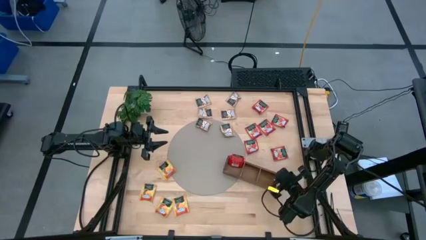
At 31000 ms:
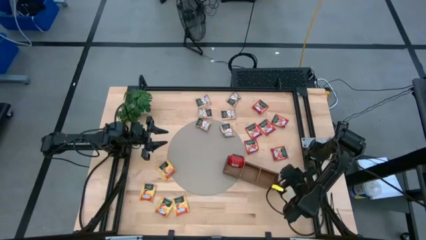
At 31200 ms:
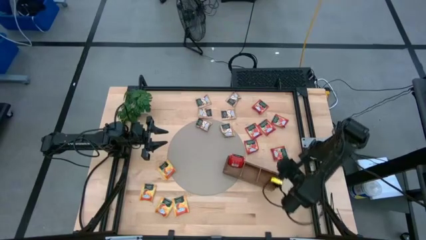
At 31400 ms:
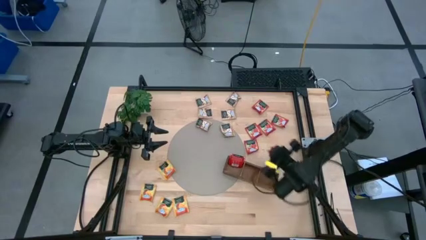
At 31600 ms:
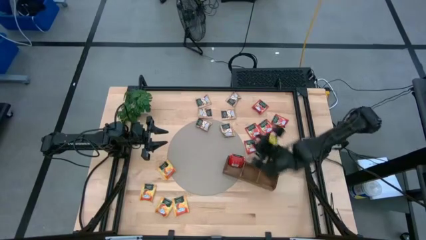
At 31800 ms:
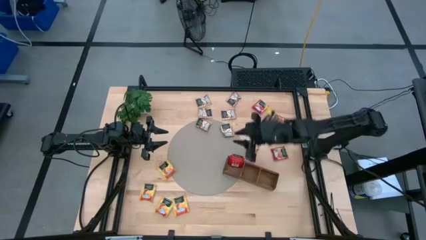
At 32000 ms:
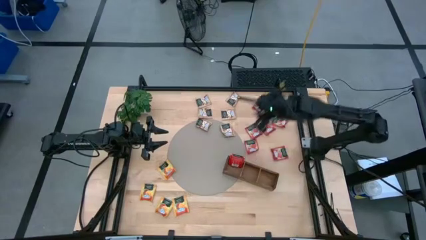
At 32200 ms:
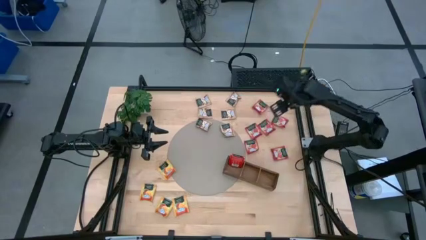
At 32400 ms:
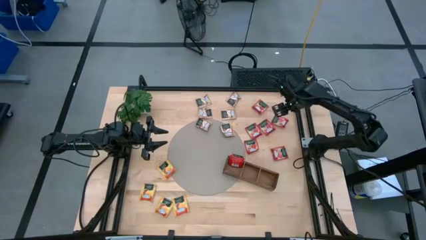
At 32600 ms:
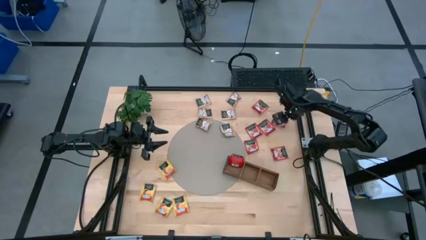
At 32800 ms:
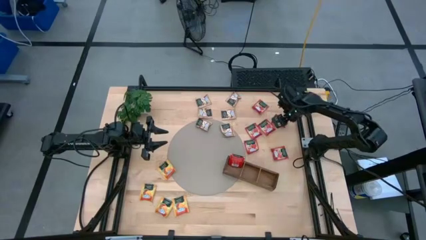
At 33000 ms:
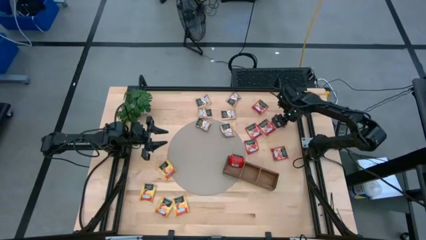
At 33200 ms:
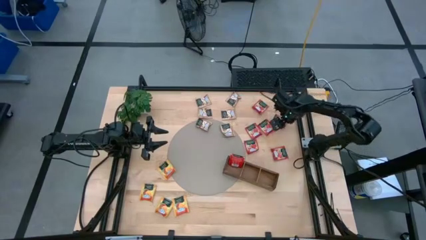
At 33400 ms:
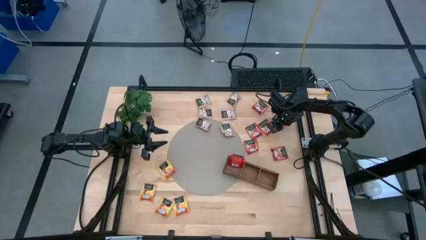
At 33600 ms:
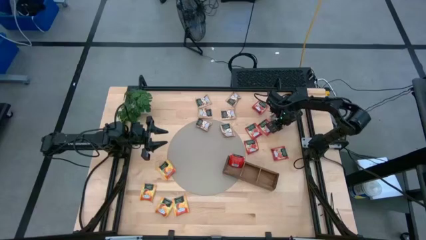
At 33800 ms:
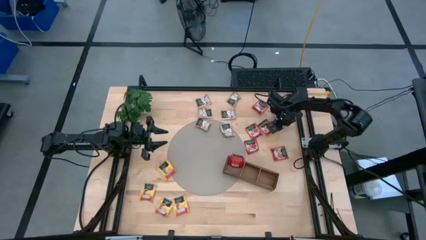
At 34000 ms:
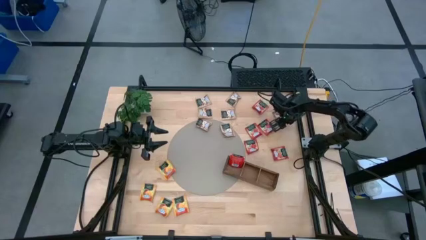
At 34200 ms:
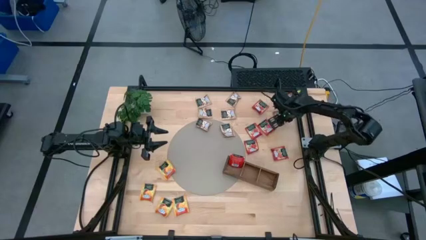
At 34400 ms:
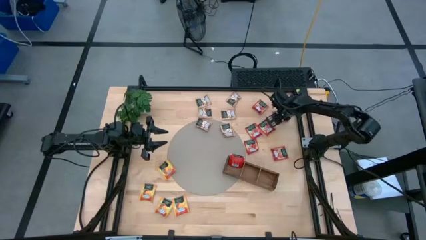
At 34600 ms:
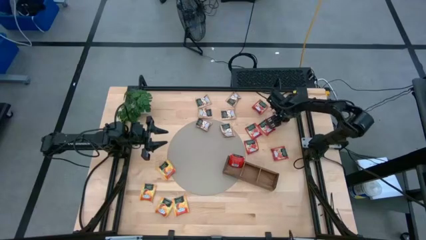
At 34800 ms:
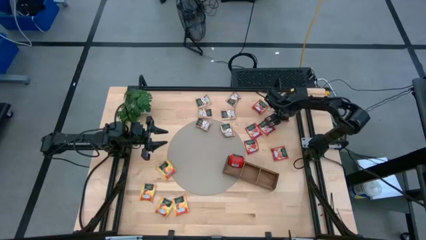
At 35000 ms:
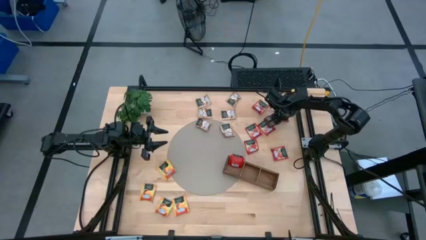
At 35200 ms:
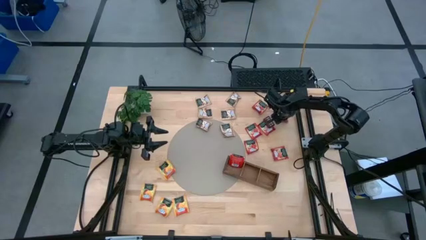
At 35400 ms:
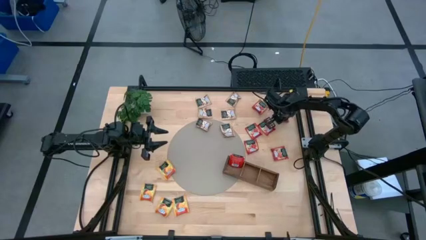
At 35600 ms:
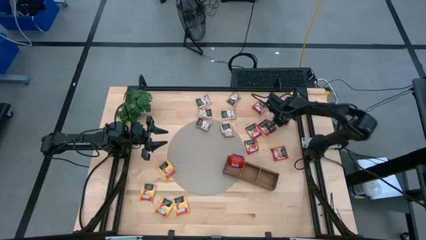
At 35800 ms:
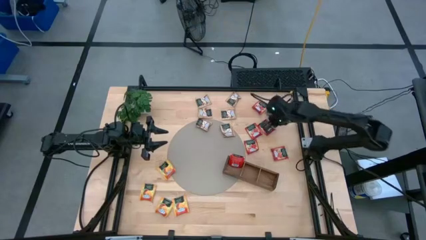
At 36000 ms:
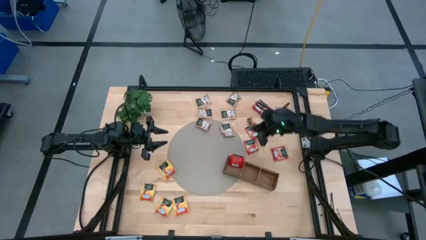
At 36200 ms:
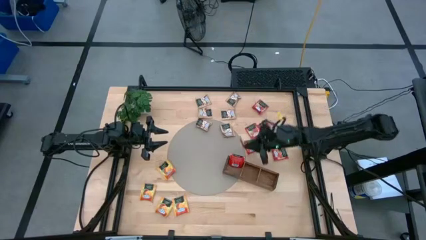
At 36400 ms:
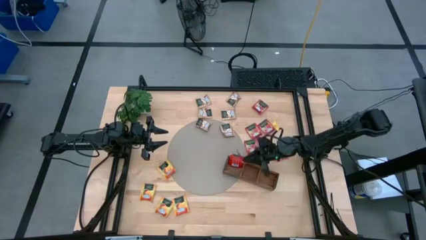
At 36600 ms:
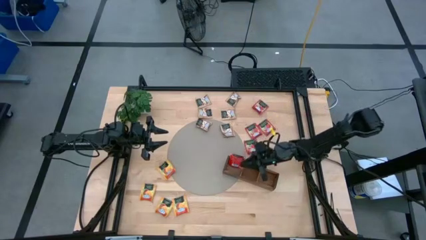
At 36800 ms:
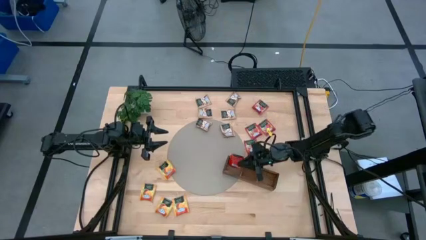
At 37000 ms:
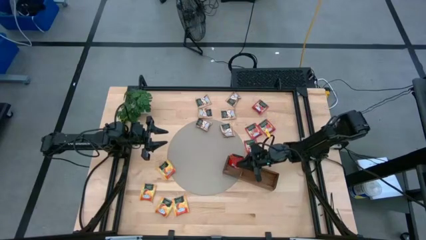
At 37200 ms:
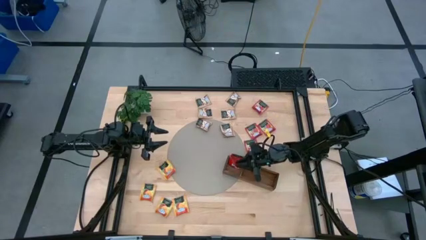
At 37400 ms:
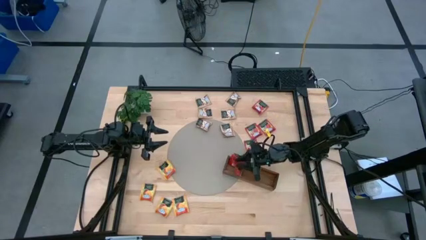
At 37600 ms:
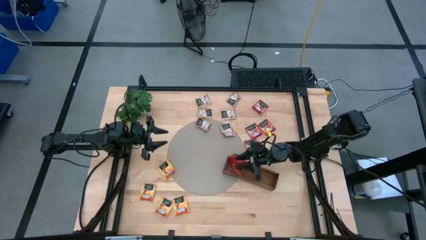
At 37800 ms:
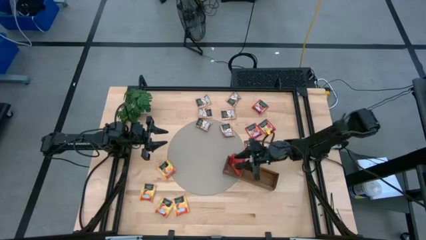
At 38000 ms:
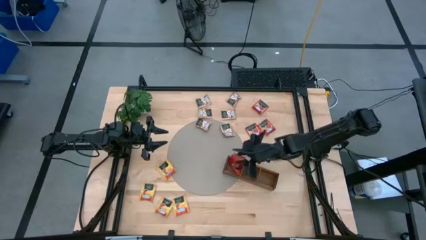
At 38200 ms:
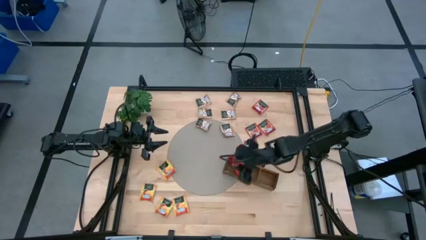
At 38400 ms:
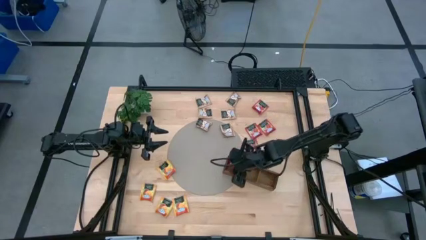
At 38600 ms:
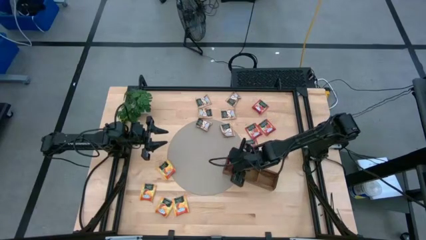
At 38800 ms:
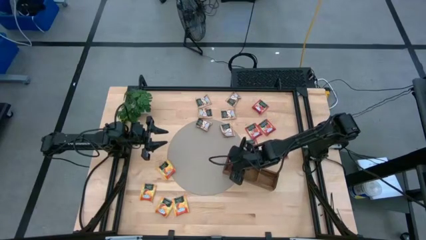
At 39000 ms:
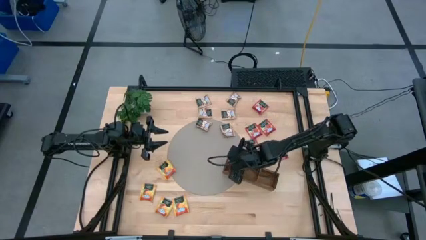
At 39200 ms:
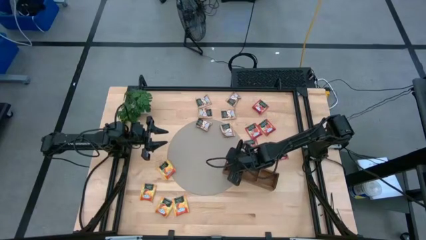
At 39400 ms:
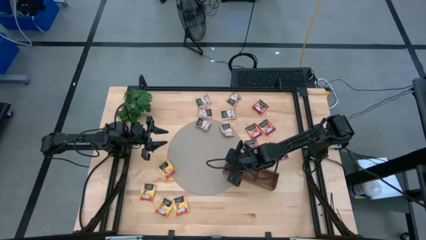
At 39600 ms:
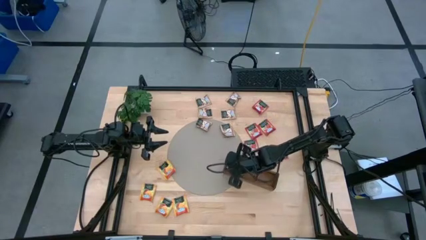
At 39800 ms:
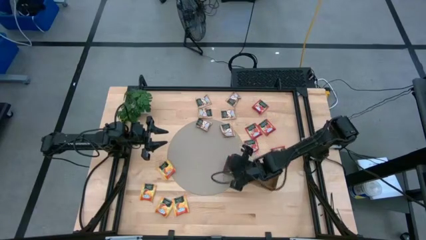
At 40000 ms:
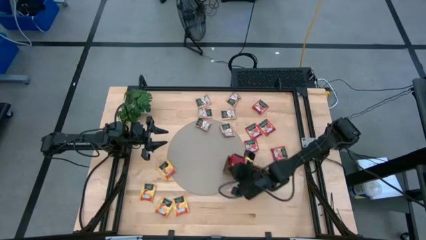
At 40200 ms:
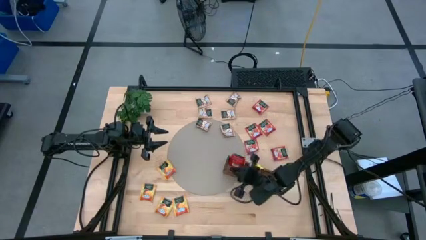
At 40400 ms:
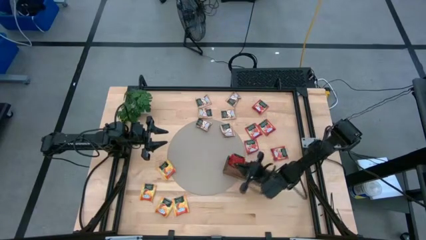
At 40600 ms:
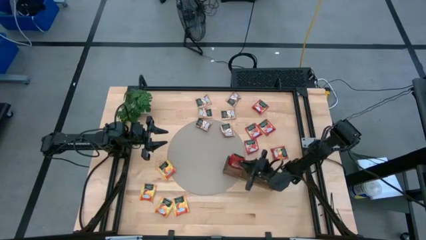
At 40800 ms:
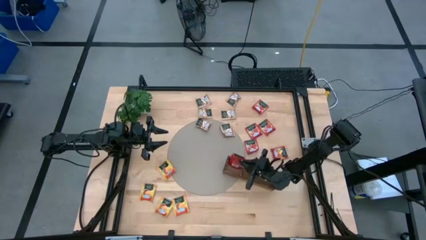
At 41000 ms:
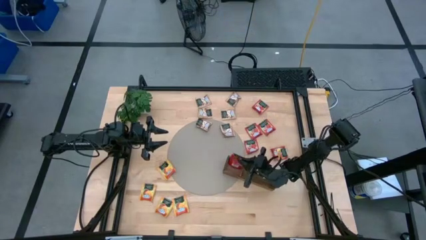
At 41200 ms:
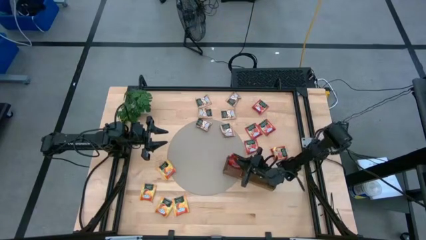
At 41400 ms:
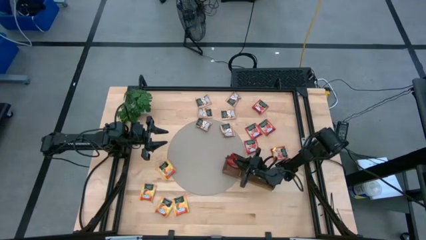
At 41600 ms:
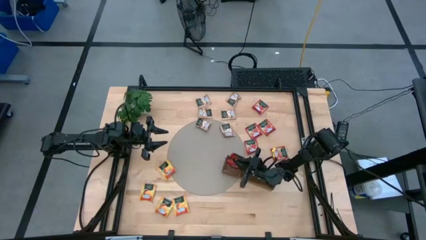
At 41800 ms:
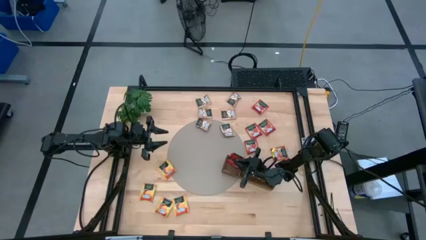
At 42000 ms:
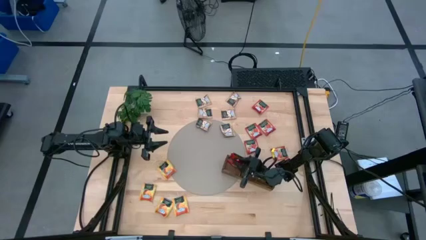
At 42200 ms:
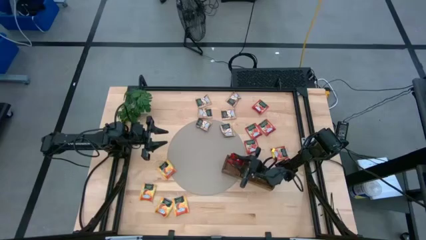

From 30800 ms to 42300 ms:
Task: Pick & Place Tea
Put the red tea bag into the left section of the wooden organizer
